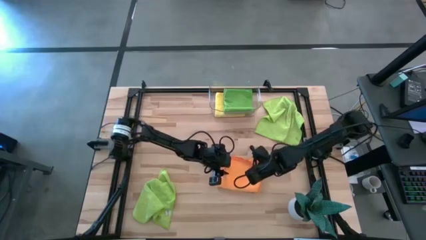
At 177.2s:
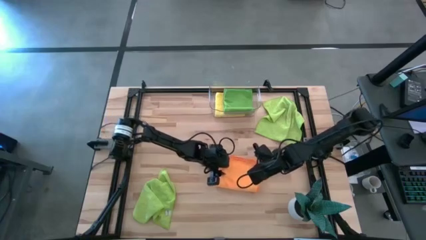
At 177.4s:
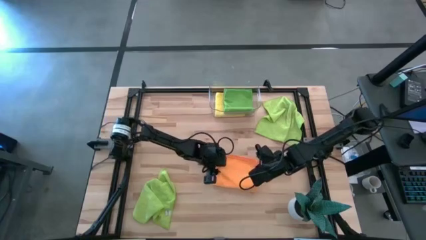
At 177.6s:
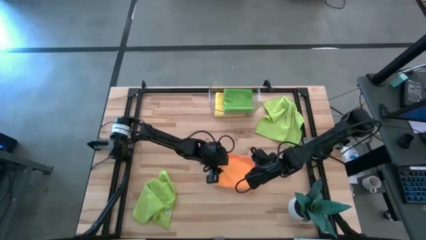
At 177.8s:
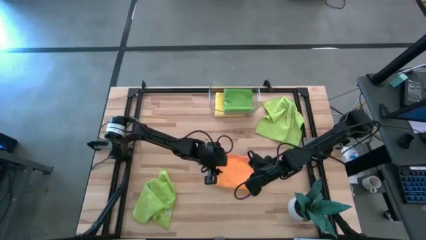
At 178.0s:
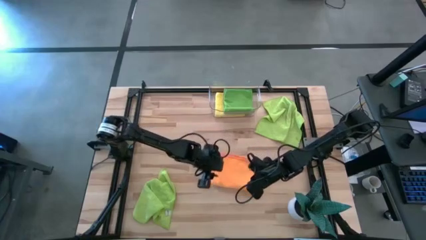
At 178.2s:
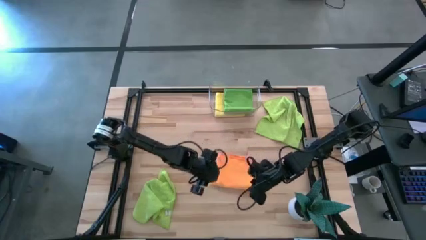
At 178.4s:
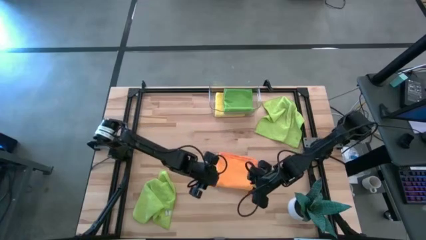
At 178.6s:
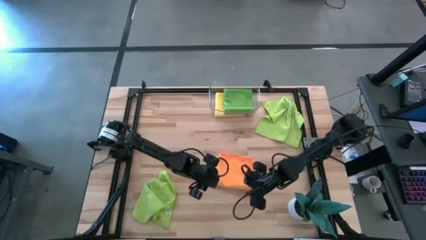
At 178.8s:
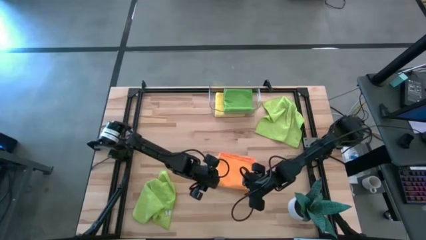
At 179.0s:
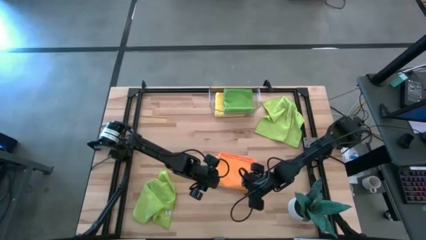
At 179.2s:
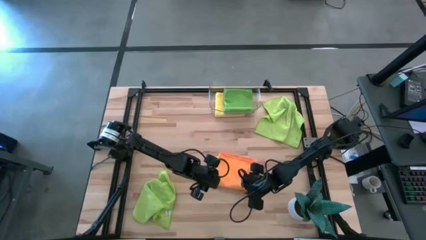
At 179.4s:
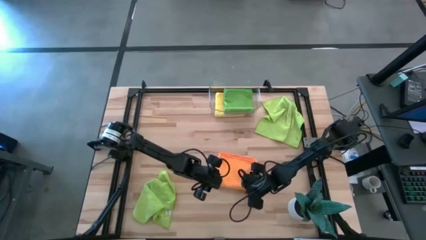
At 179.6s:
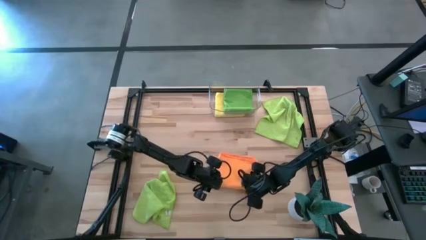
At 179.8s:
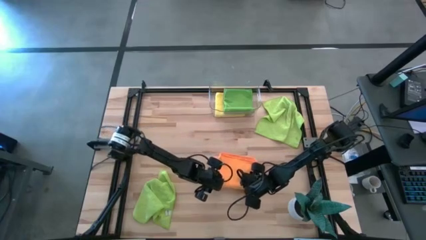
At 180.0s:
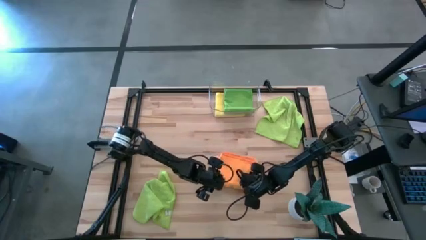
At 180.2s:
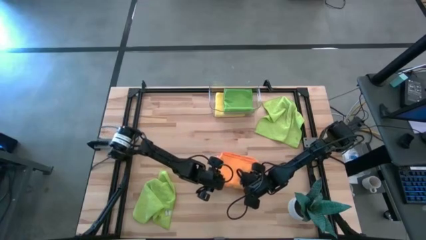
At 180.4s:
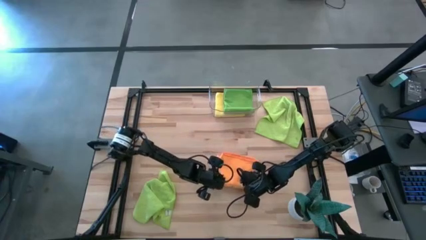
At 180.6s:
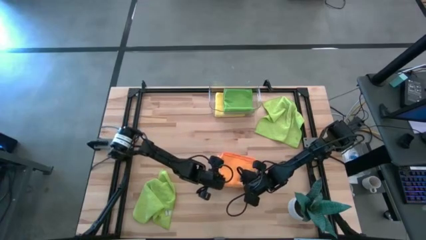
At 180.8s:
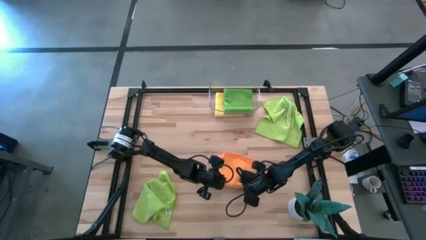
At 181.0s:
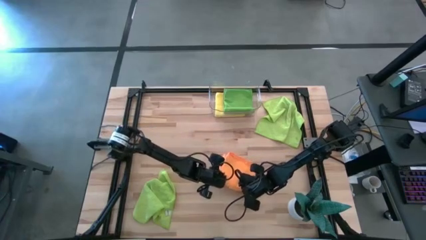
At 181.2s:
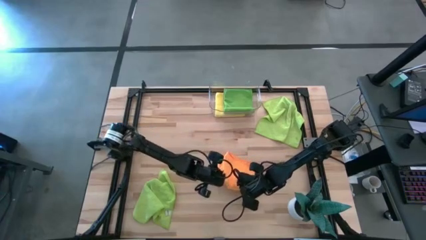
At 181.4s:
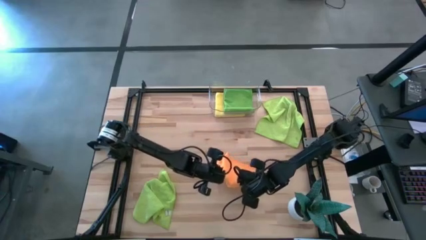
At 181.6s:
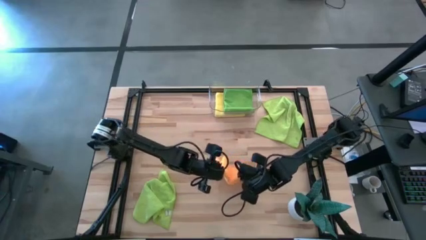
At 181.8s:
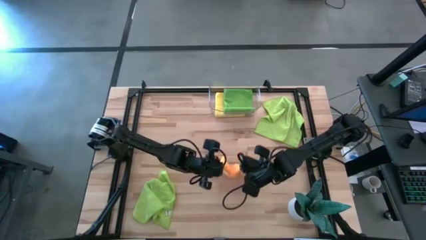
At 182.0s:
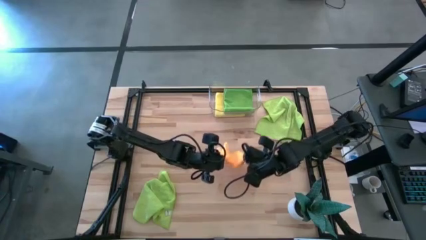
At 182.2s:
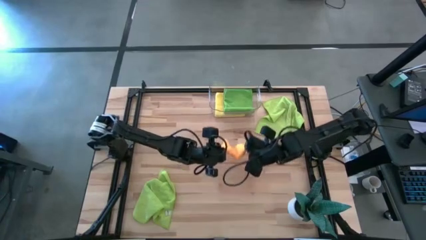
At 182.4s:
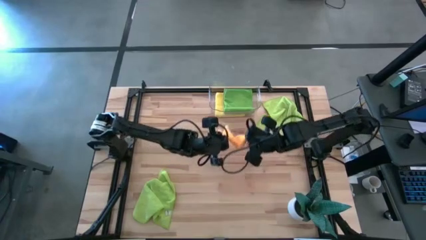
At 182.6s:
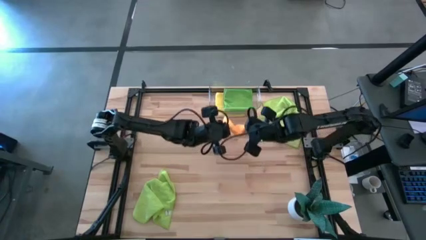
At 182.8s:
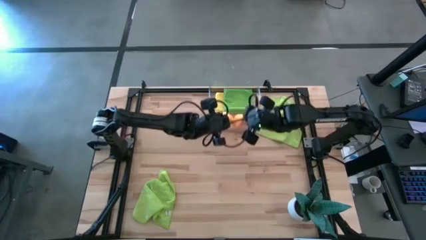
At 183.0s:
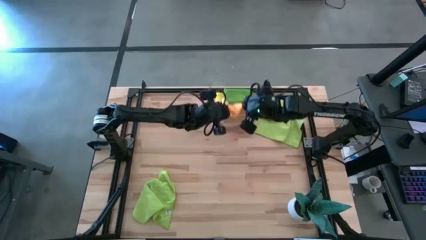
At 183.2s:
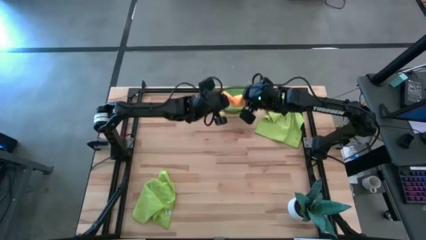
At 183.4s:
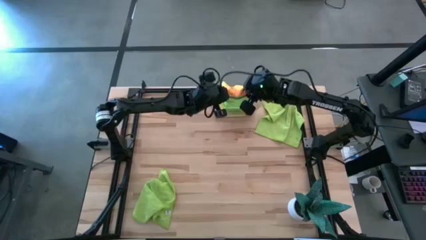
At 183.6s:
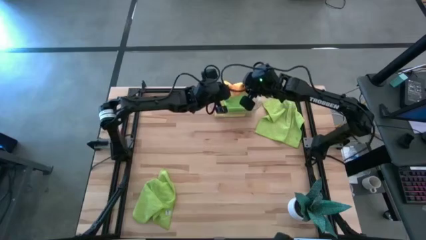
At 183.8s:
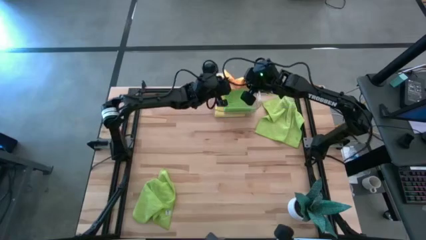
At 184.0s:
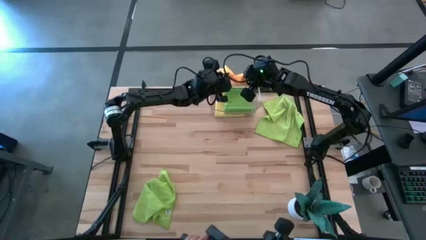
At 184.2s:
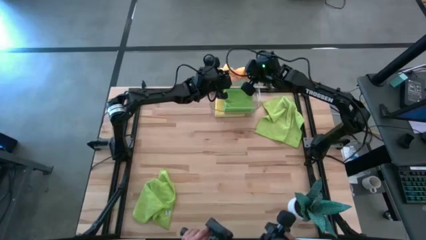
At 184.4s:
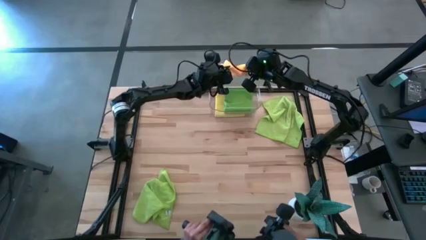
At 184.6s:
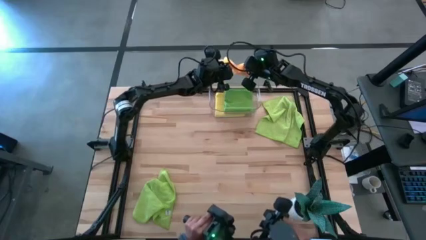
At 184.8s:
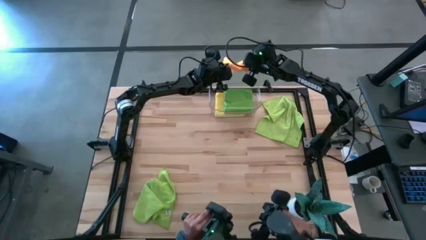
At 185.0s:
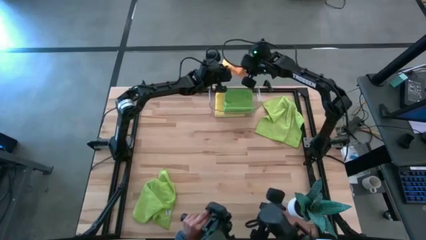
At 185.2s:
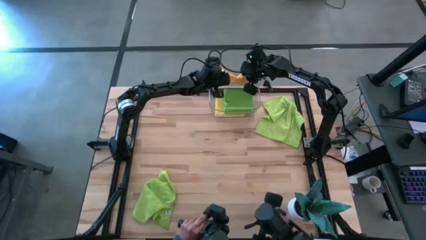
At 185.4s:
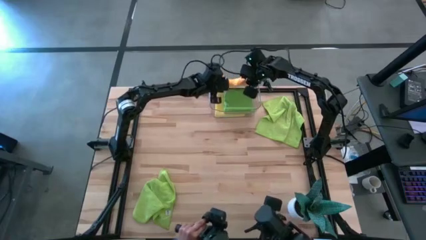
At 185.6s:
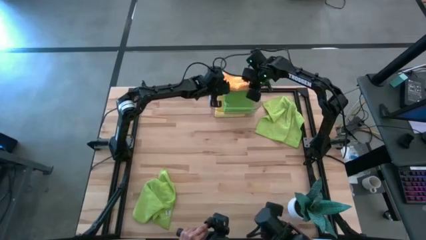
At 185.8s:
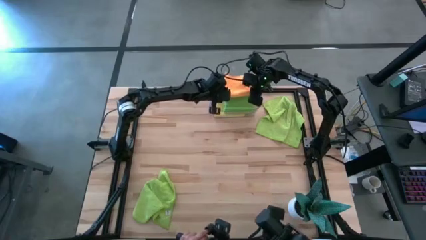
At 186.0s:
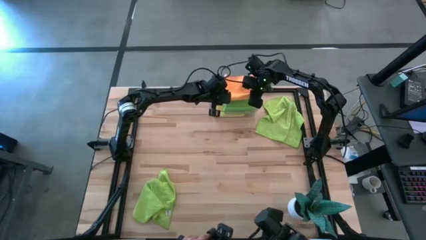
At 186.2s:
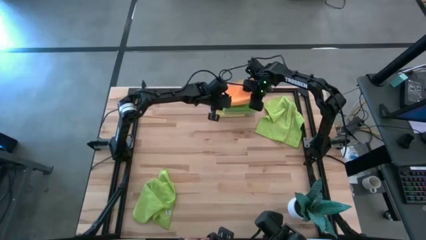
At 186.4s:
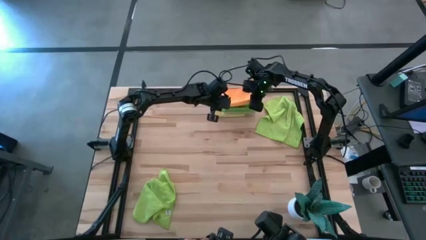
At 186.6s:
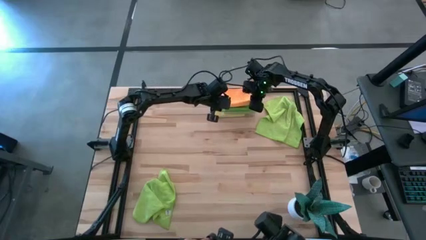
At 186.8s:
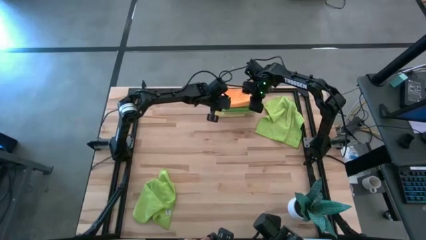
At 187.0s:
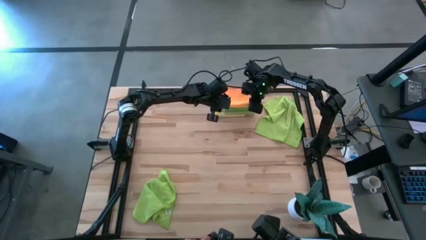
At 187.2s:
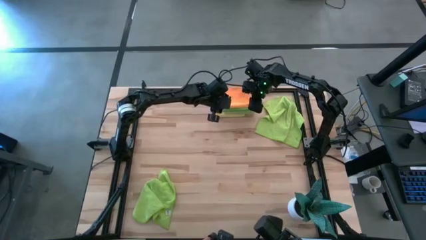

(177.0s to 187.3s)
Task: Fold microfiber towels
Put the orange microfiber cloth into the transparent bin
